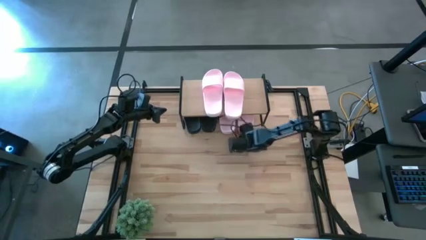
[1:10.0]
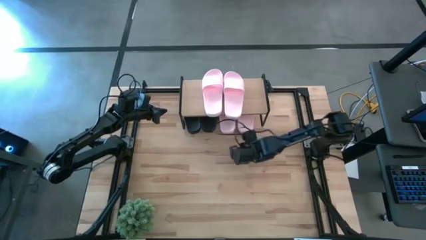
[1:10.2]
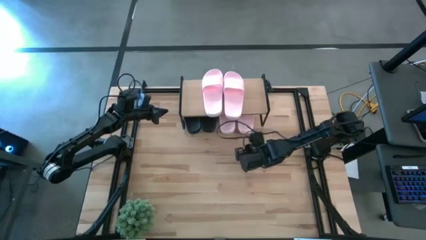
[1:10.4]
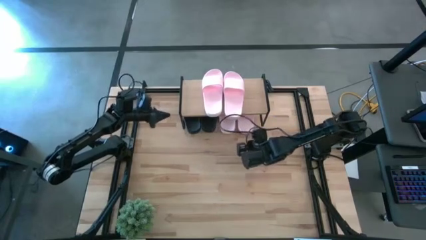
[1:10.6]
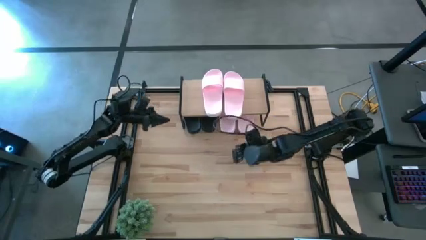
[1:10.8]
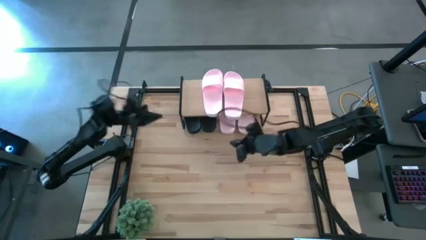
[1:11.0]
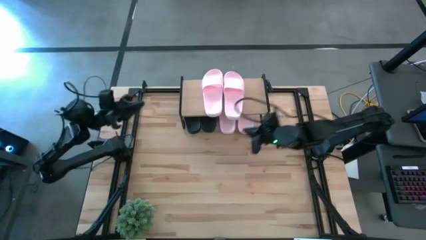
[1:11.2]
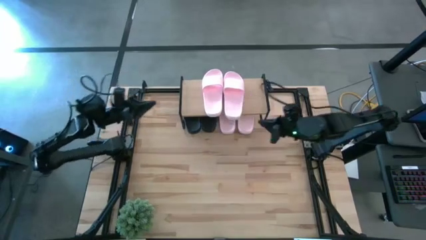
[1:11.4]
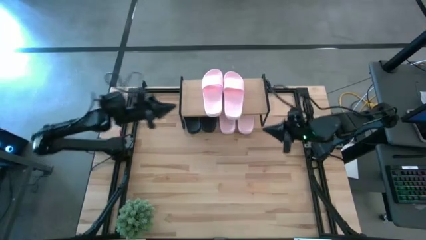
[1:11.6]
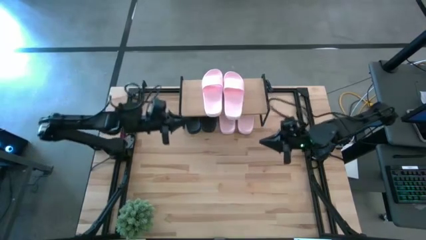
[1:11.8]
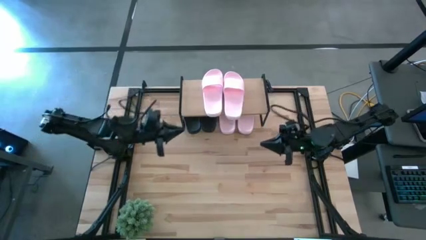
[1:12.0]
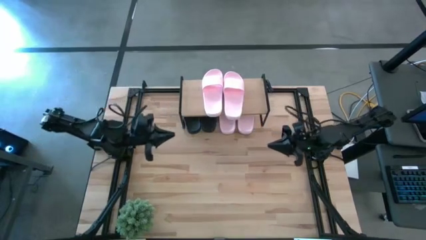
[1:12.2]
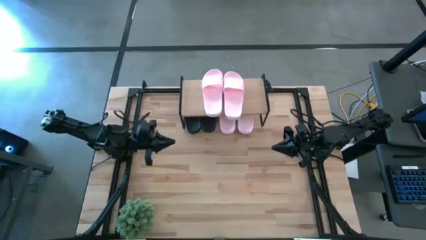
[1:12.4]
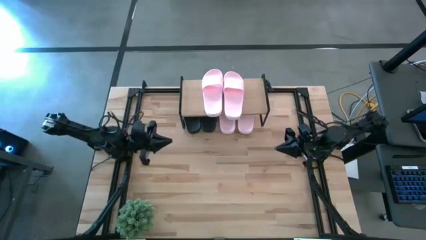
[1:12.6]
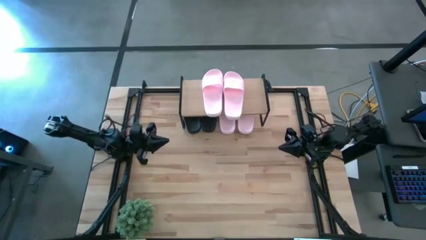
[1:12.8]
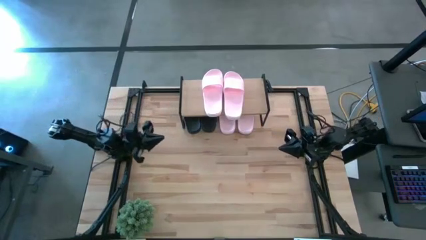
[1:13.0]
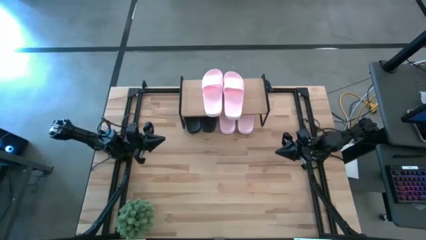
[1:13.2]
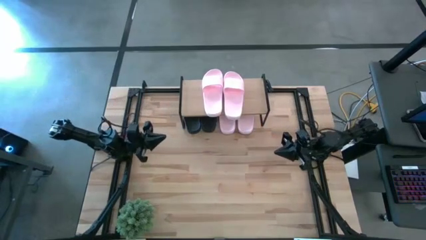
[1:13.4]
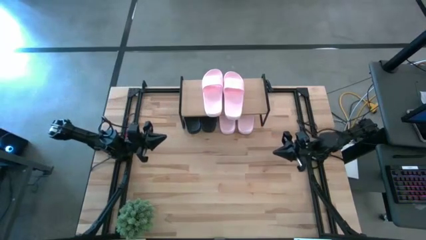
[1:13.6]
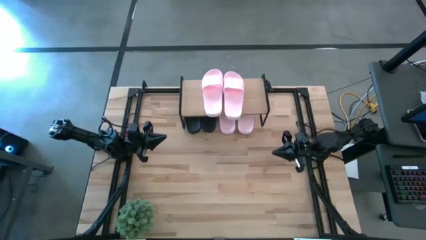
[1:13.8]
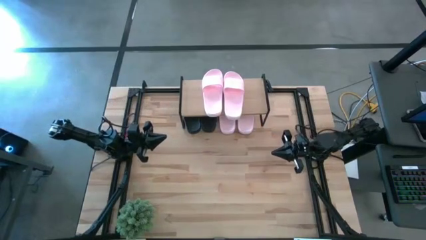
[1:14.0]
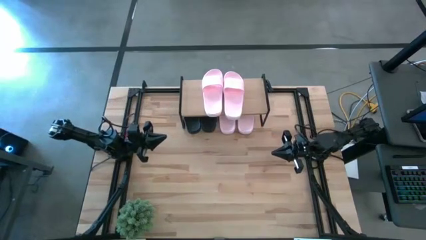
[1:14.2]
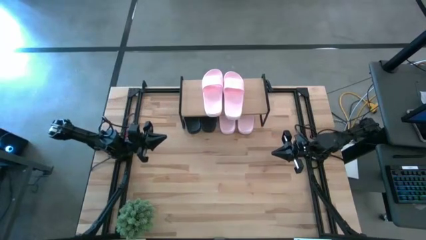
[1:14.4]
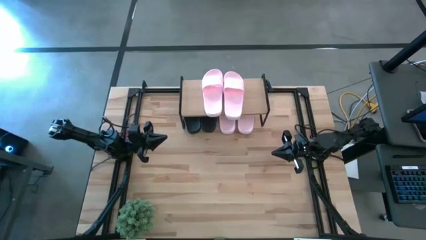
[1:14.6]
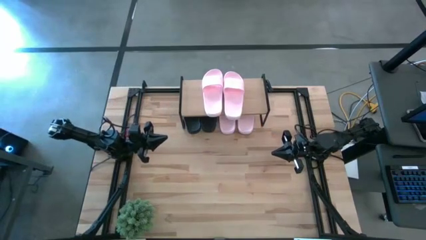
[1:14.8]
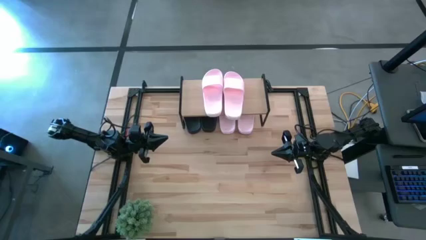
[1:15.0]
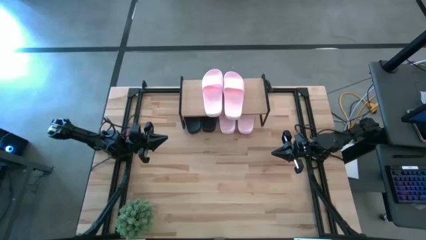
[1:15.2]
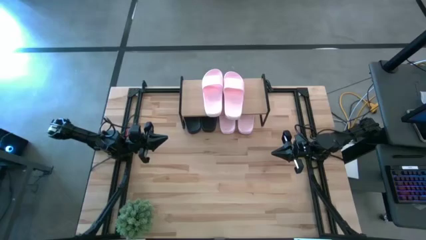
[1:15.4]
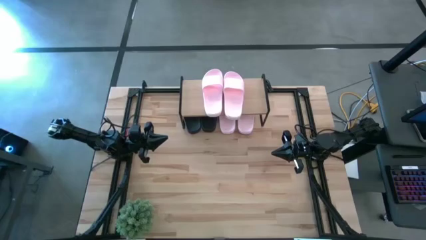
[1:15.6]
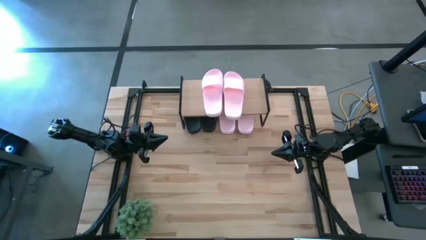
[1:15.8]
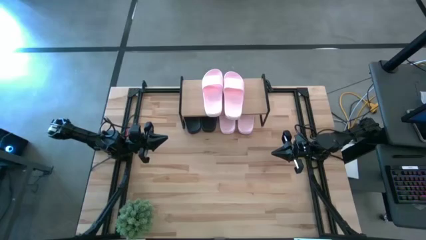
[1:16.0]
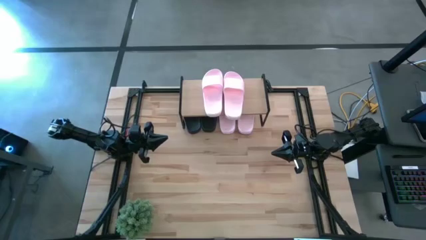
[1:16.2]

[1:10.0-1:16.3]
Task: Pick and place slides into the shelf
Return to Home Position

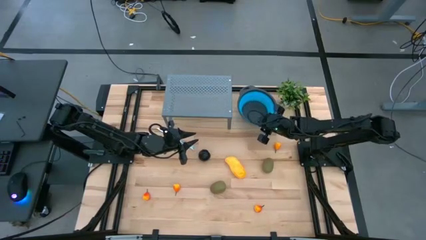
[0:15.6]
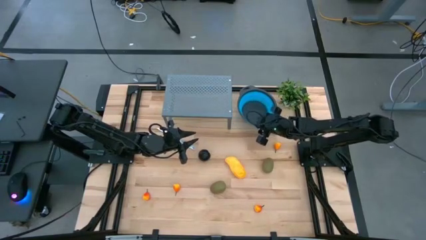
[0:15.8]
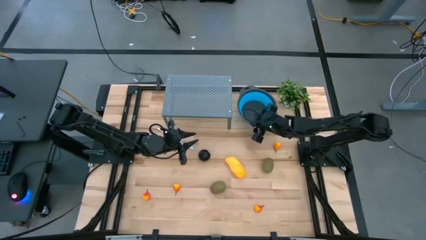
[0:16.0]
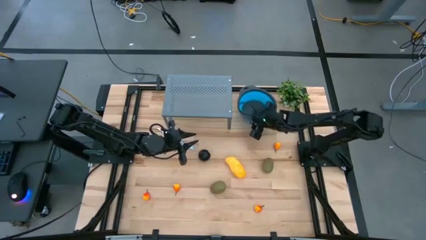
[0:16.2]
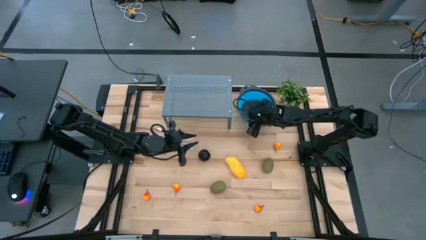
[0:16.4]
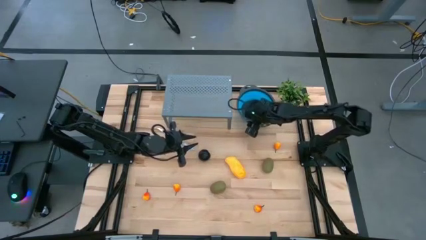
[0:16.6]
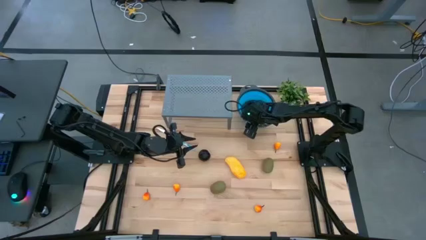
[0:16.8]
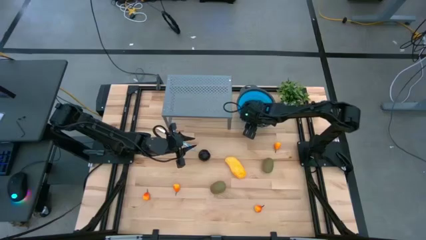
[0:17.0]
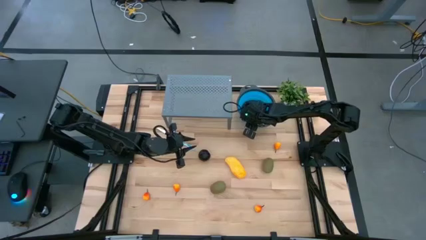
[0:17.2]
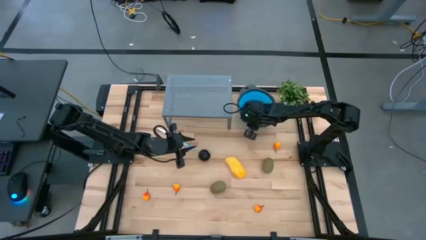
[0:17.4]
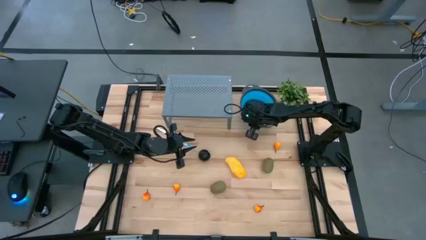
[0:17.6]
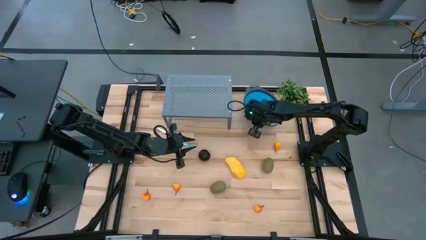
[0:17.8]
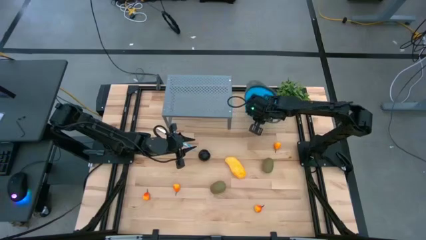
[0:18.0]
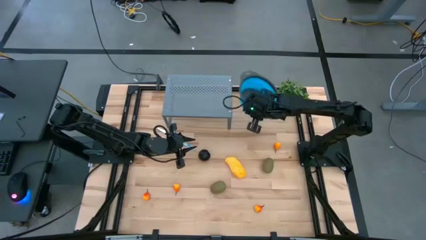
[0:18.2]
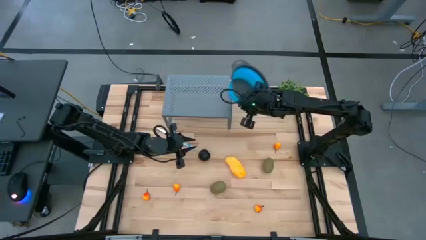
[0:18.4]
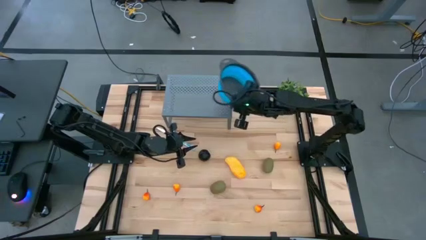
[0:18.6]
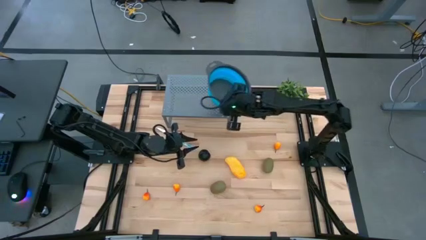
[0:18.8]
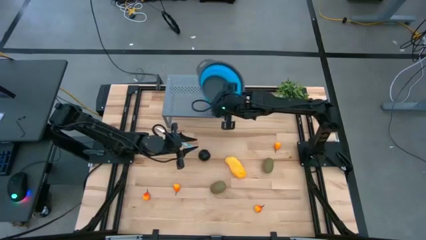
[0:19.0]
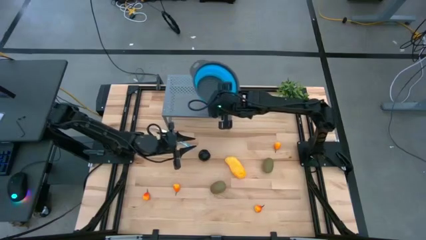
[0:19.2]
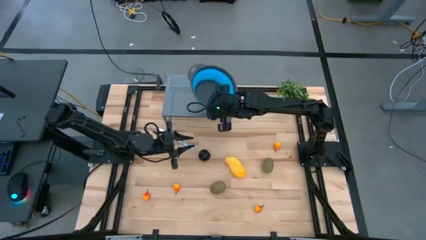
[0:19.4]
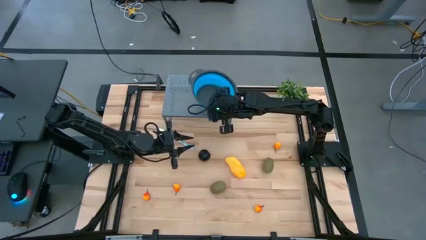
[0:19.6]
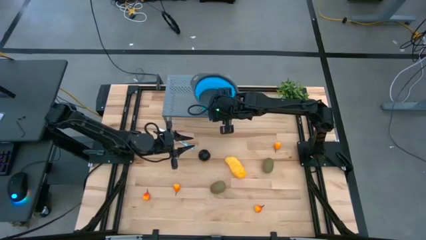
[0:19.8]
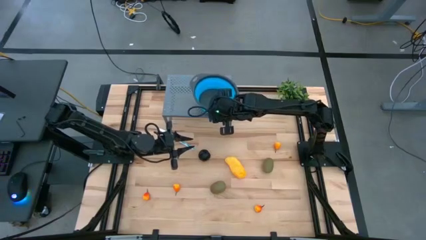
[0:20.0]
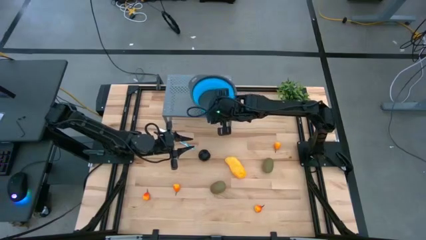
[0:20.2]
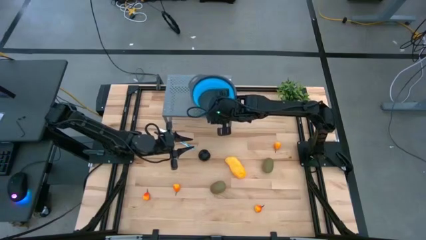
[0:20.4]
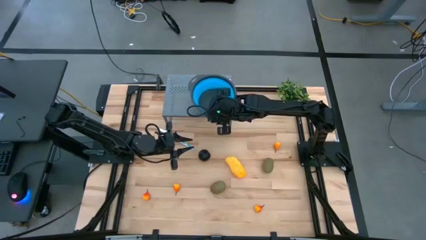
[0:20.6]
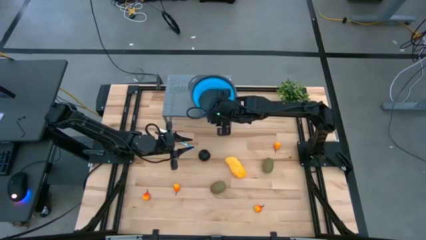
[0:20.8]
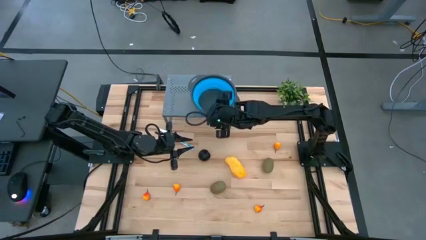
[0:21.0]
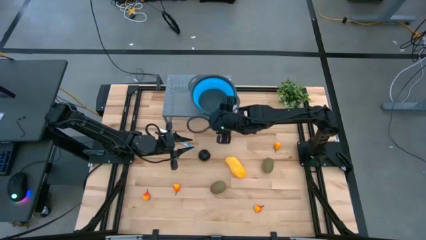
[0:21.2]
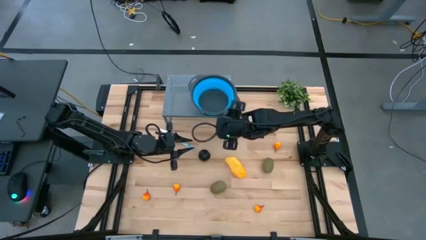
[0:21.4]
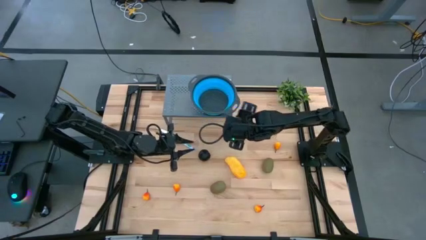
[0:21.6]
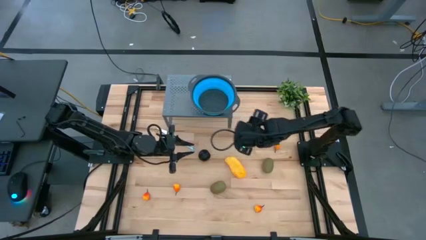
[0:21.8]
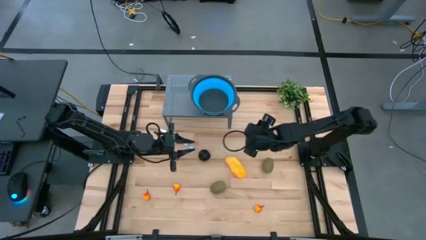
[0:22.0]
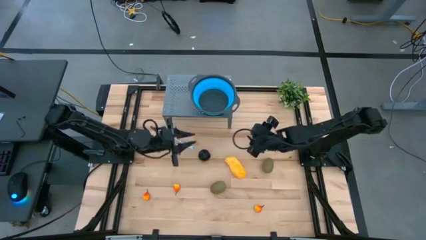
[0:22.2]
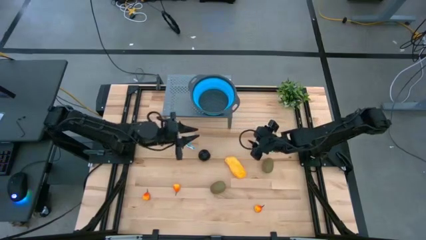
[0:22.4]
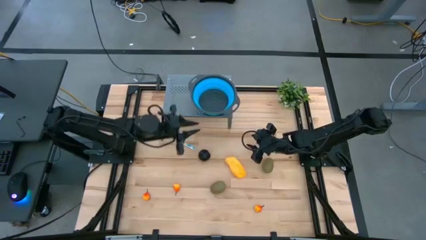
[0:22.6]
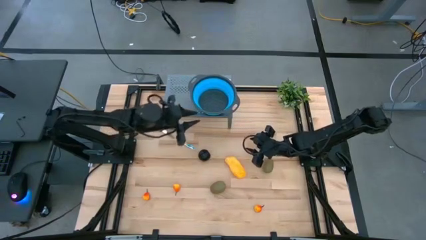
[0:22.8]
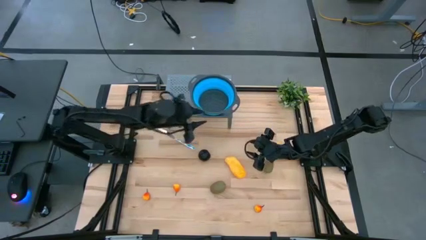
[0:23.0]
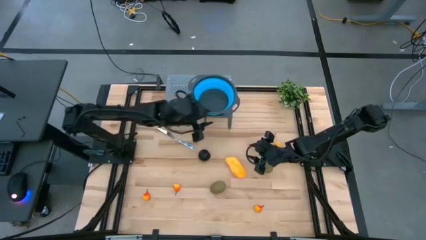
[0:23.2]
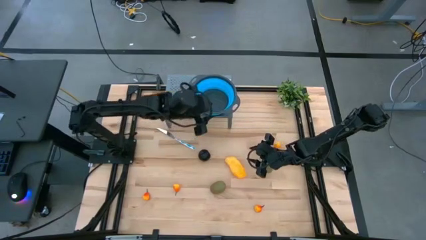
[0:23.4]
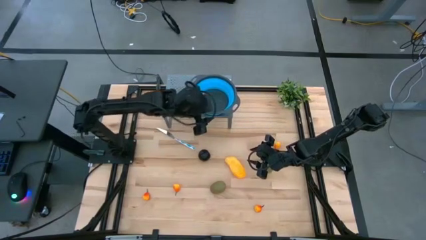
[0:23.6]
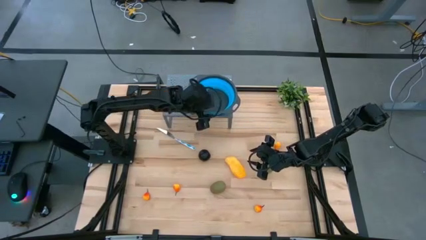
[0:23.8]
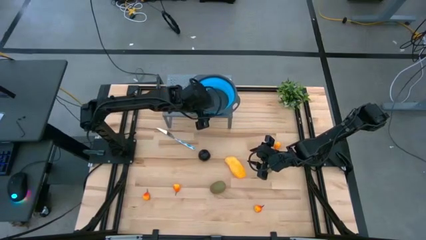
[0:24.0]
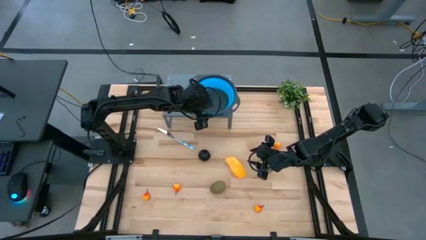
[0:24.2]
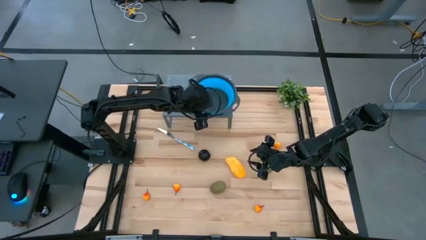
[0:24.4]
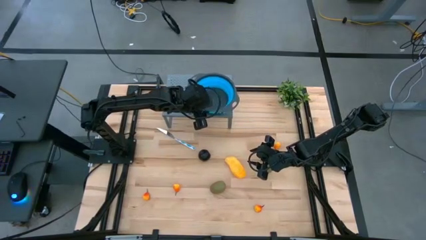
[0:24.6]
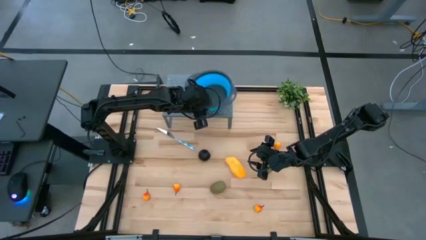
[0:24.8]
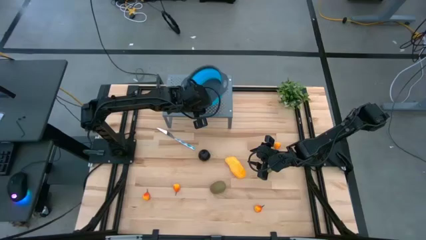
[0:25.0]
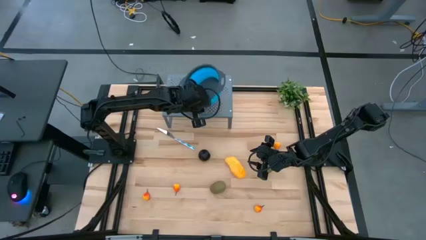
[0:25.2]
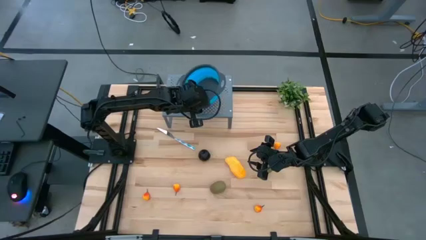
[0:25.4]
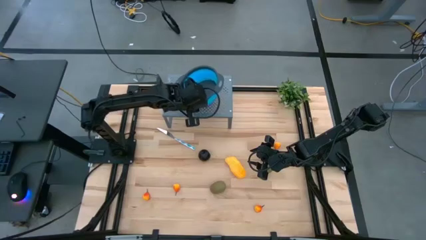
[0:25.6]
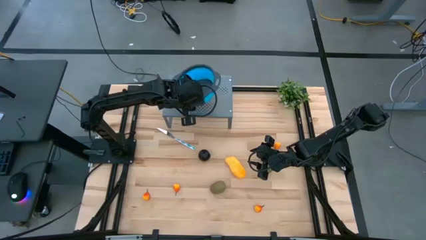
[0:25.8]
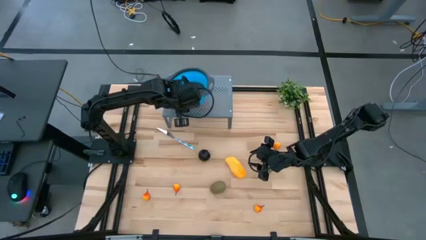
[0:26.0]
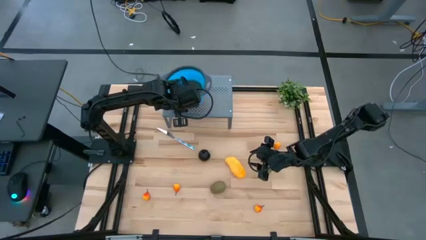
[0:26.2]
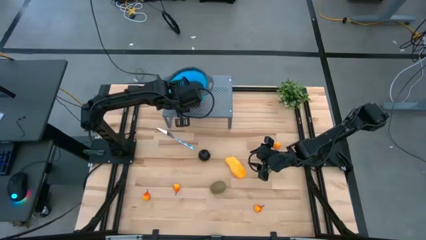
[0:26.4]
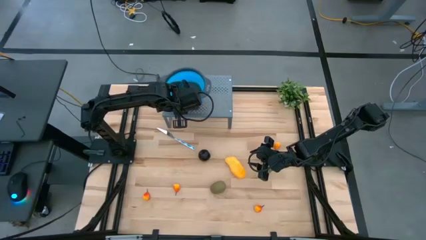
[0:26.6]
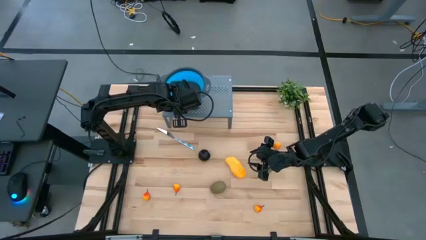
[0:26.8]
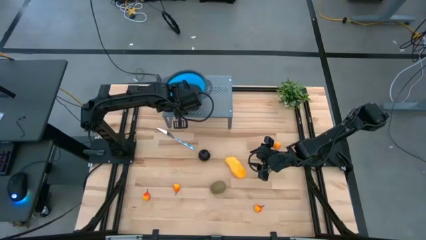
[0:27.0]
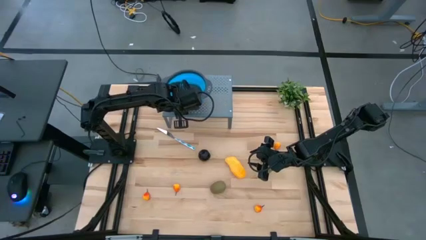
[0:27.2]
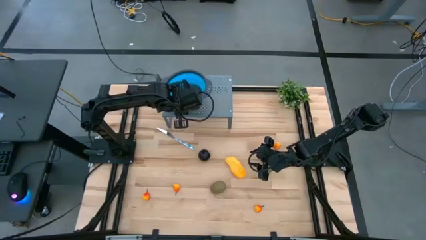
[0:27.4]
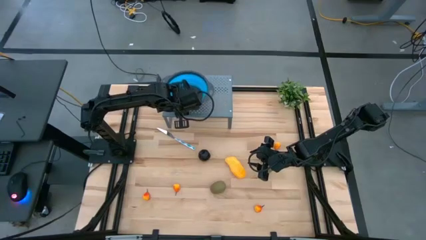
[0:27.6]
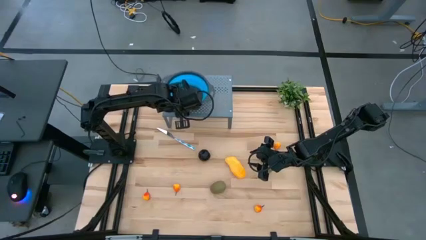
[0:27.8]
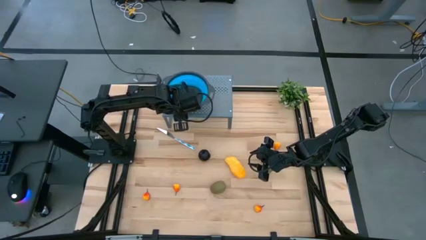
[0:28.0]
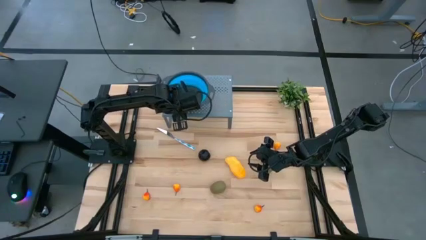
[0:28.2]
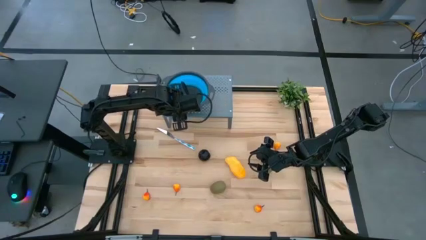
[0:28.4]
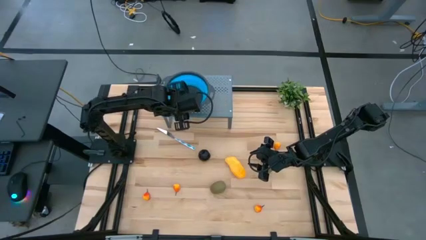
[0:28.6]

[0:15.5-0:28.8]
Task: Pick & Place Fruit
Put the blue strainer bowl on top of the gray metal shelf
